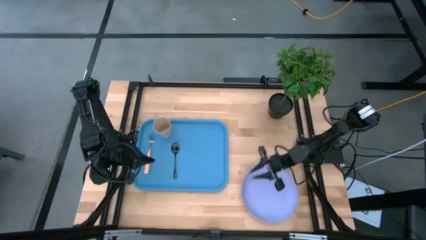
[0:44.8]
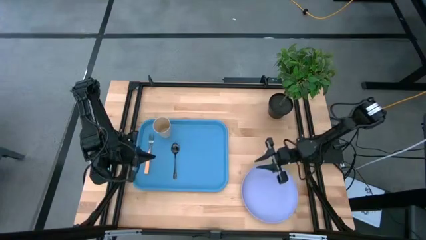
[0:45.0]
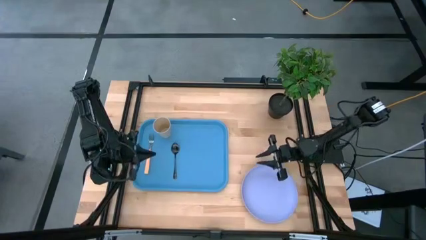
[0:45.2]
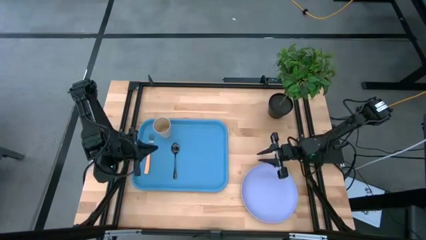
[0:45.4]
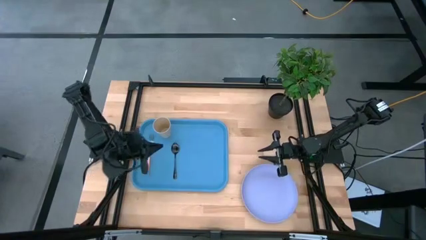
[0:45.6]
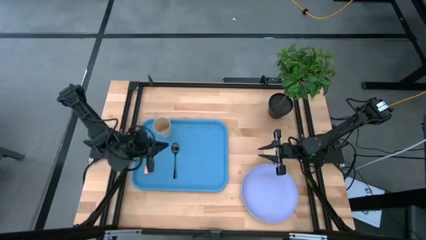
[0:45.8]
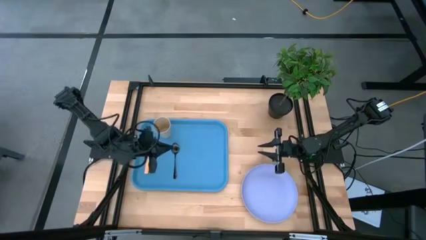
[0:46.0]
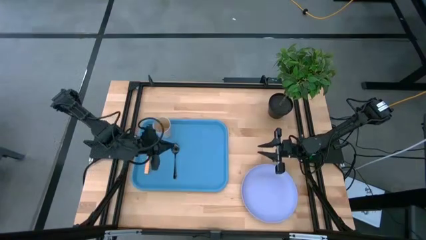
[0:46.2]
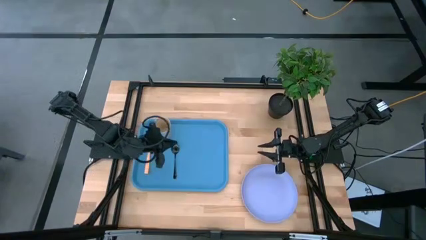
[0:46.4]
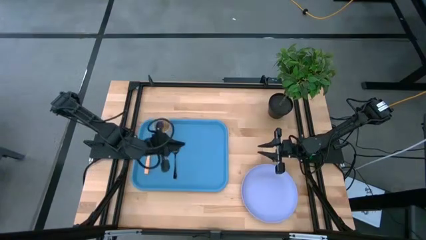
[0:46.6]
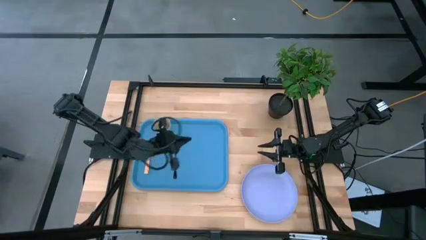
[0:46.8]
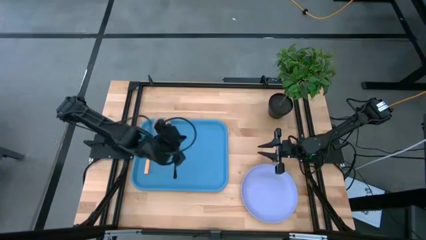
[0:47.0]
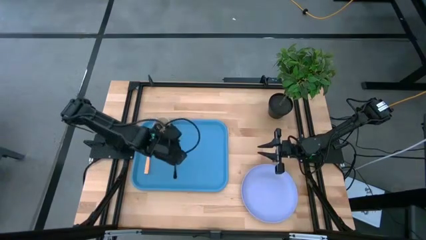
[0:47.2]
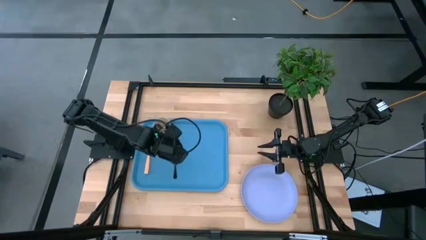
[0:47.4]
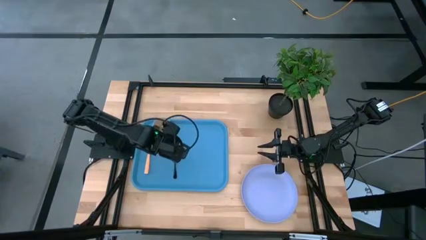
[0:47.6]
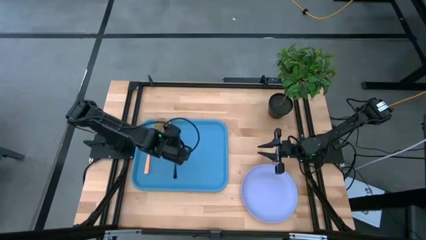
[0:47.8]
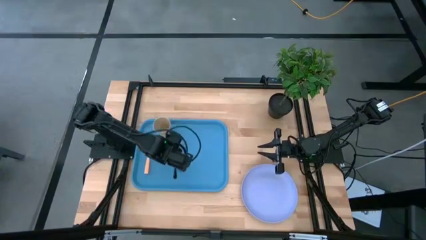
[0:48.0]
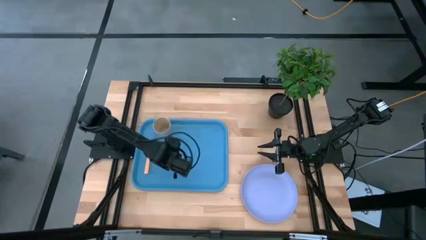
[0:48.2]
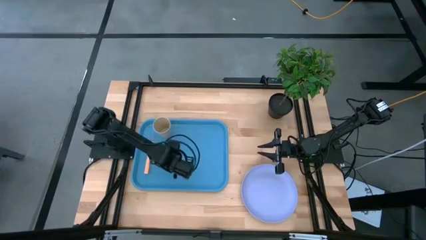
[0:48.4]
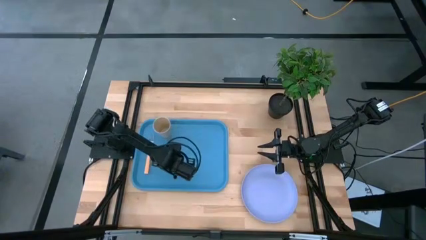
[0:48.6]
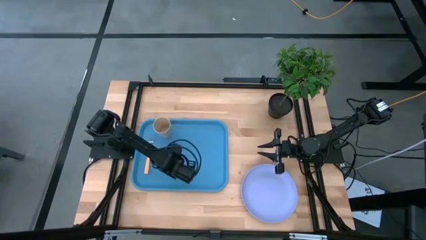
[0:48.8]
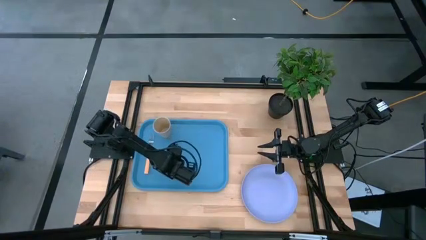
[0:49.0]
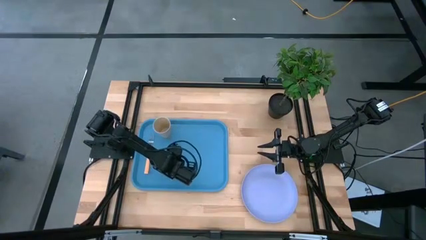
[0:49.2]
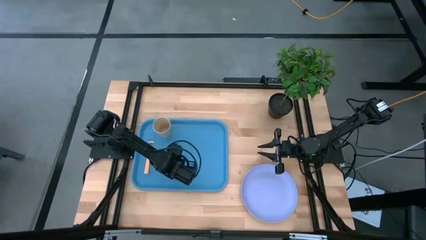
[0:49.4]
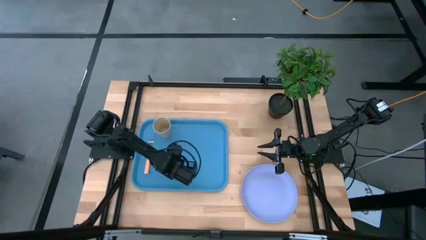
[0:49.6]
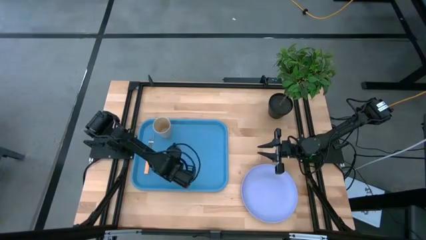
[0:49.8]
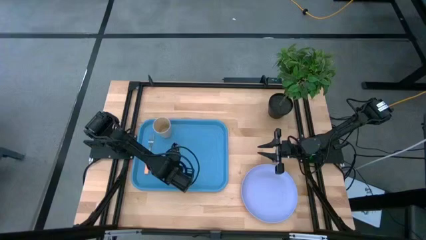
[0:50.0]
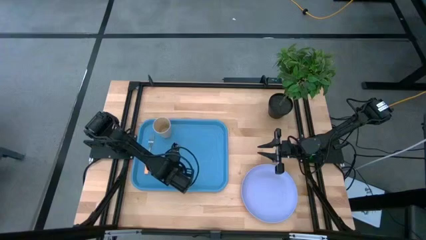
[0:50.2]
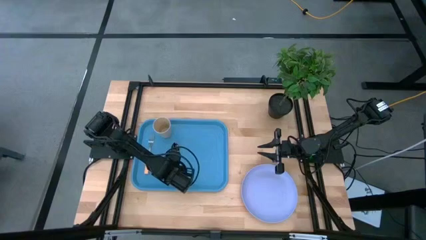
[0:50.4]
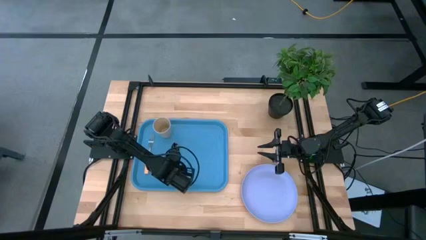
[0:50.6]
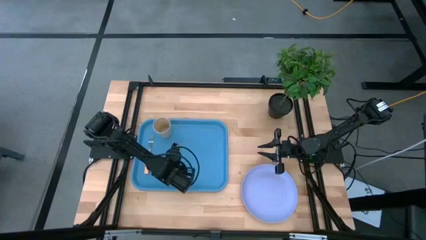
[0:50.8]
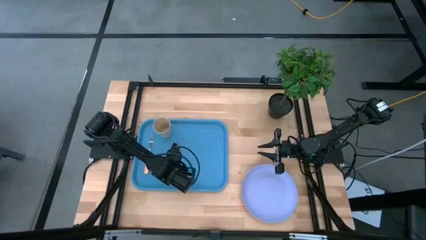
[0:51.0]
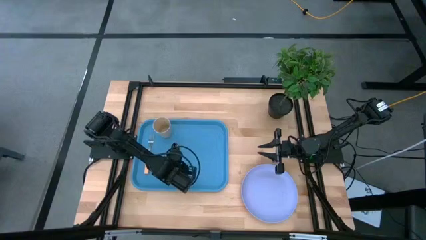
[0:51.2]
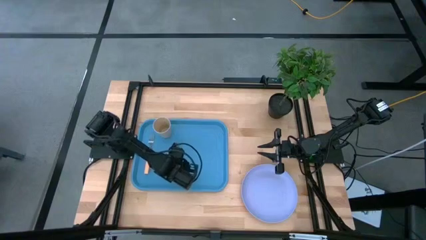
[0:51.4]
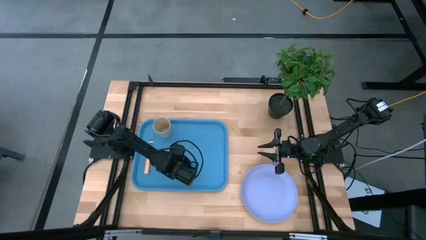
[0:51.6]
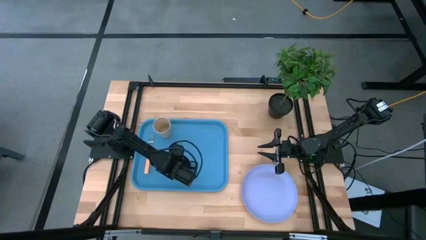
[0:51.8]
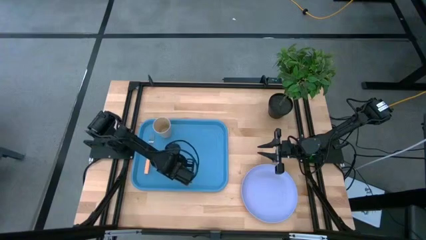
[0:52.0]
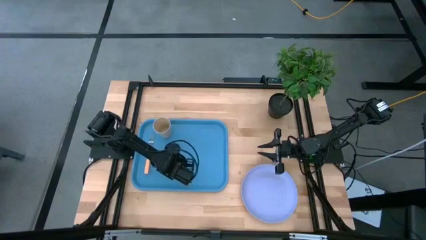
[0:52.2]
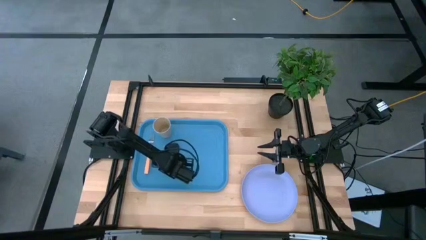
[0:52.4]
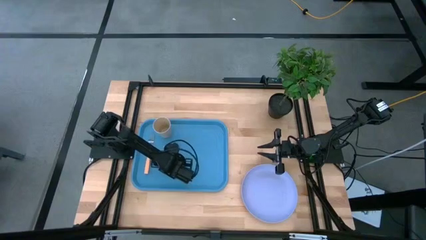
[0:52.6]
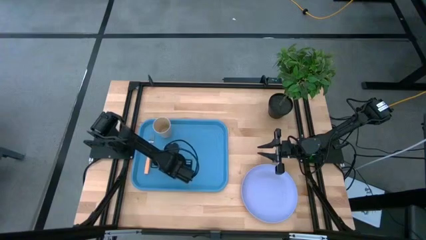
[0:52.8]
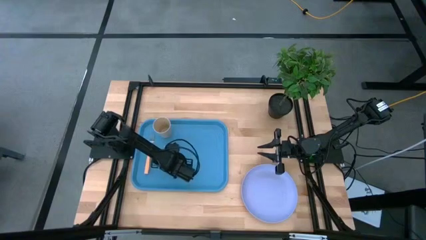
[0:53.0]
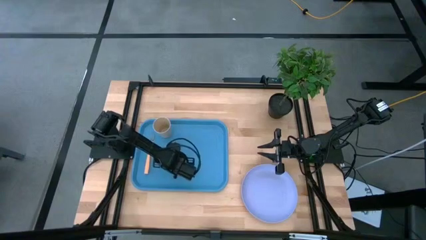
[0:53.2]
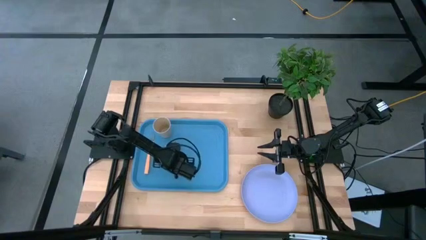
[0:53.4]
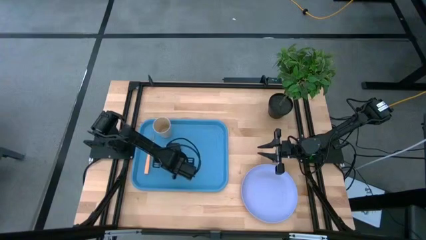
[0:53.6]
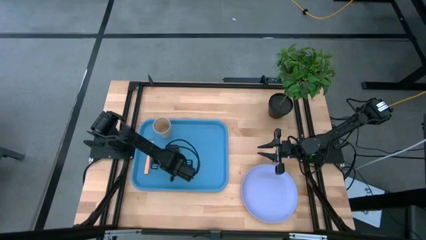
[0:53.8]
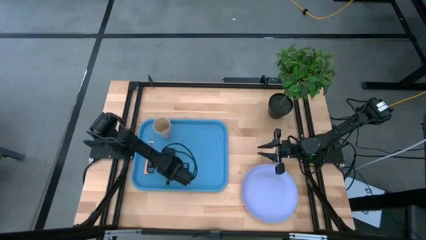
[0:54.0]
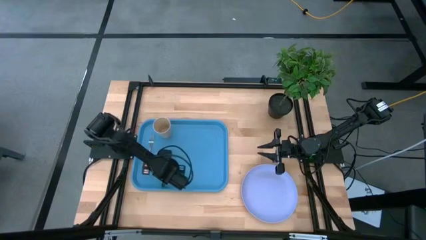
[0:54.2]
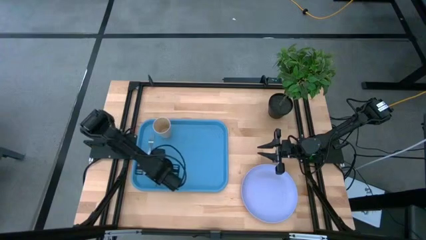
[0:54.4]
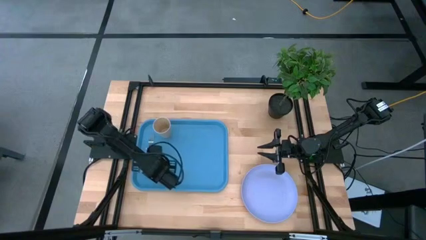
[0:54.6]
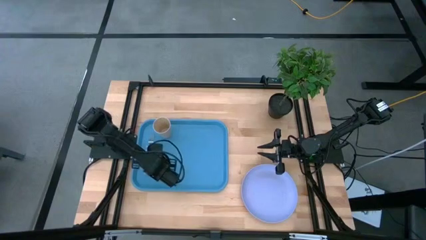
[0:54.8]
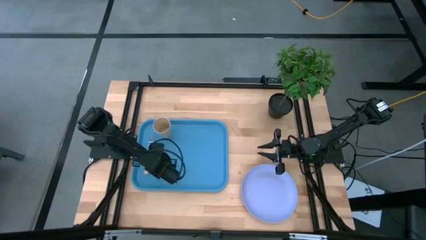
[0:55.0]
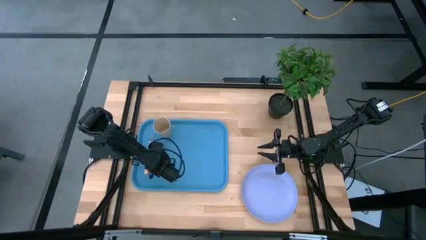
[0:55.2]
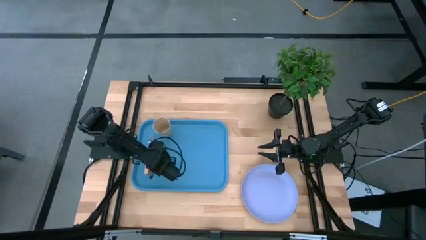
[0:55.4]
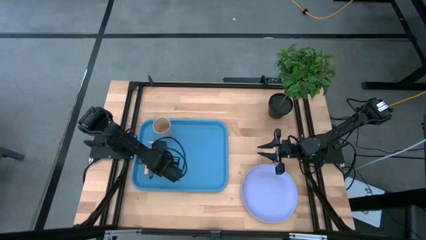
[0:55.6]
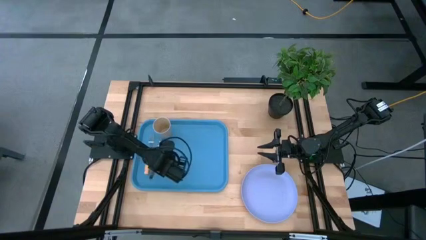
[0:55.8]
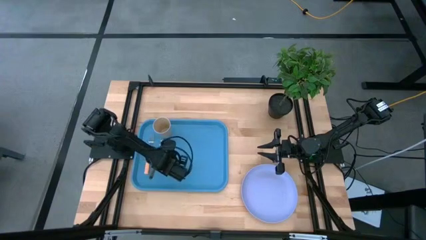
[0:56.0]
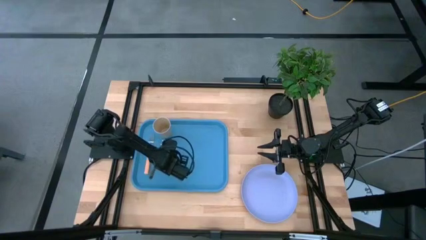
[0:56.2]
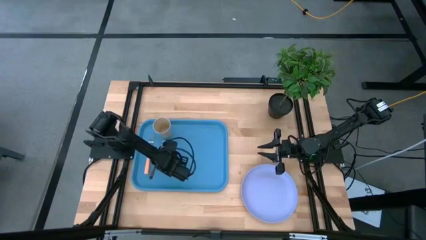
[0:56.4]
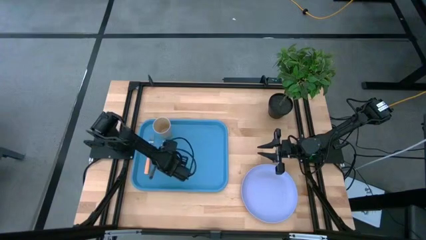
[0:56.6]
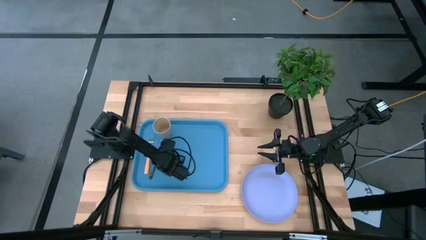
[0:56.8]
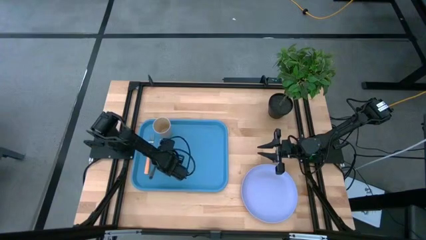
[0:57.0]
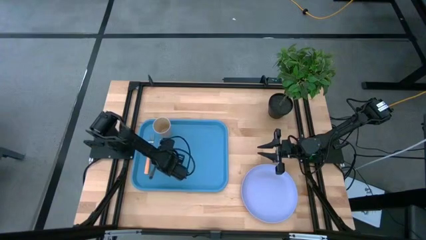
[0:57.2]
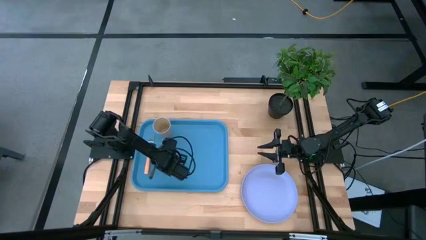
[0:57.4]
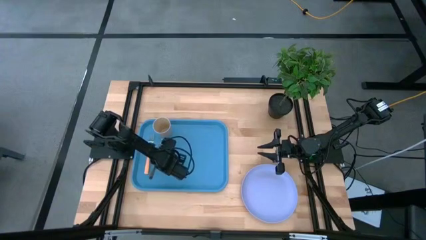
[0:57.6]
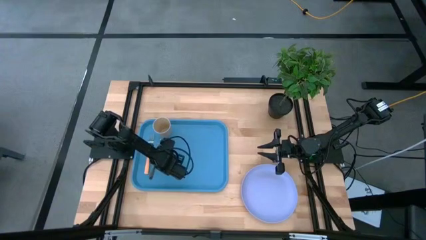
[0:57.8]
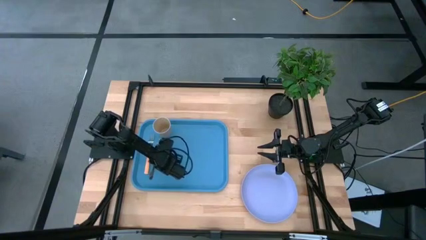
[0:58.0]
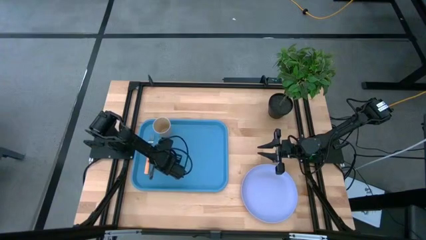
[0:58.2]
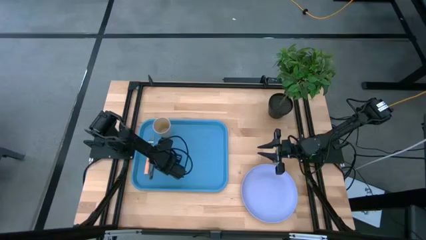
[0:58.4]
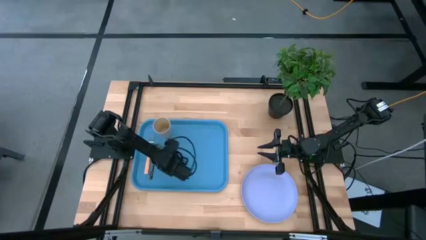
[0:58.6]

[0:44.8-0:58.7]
Task: Pick and place plate/cup/fork/spoon on tray
Put the black spoon on the blue tray

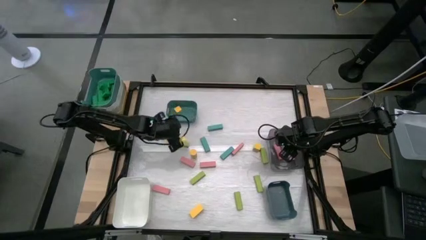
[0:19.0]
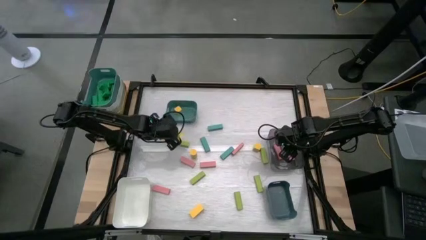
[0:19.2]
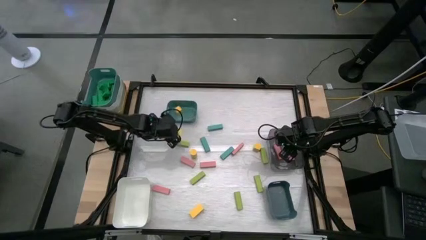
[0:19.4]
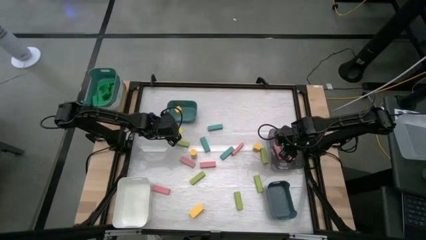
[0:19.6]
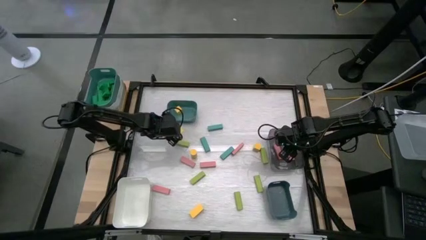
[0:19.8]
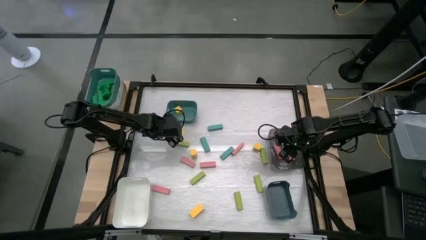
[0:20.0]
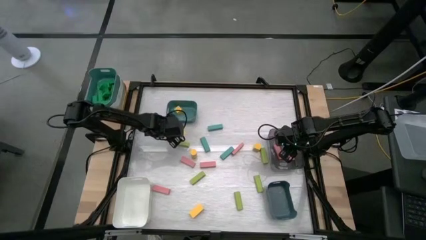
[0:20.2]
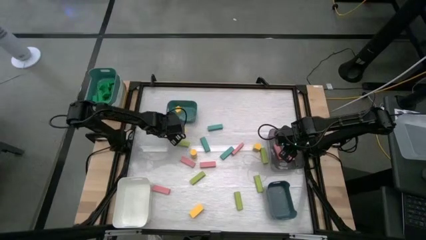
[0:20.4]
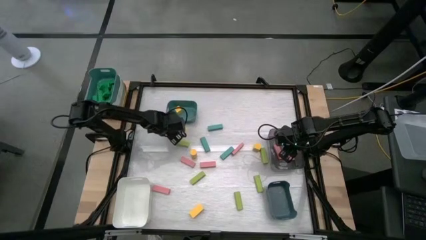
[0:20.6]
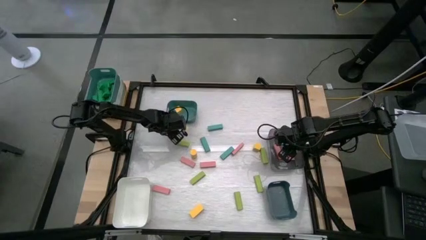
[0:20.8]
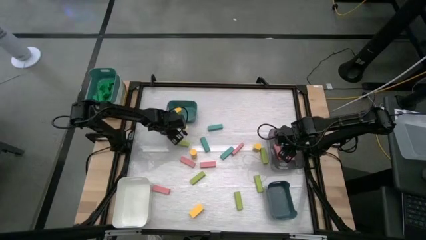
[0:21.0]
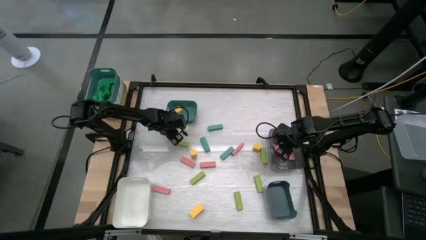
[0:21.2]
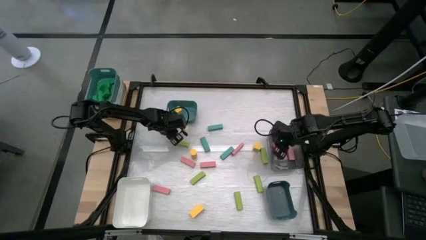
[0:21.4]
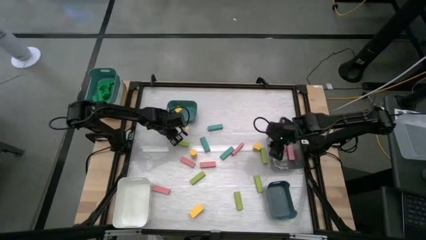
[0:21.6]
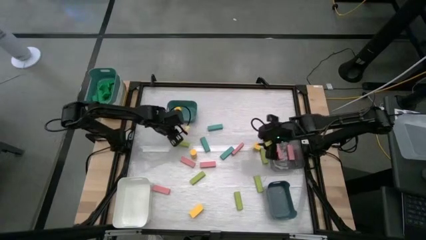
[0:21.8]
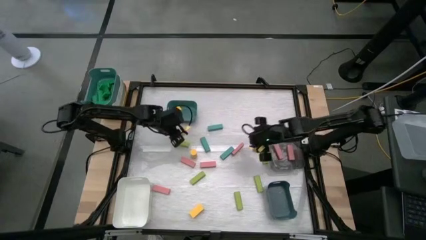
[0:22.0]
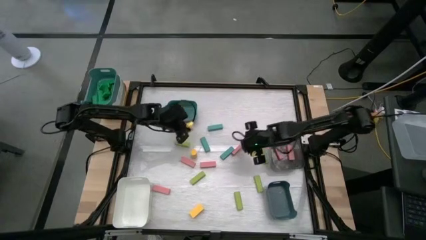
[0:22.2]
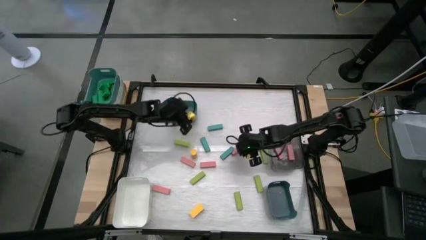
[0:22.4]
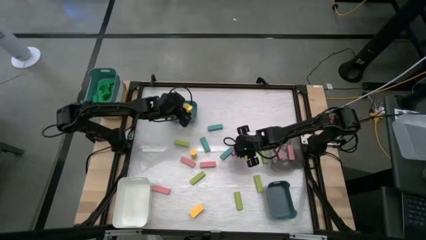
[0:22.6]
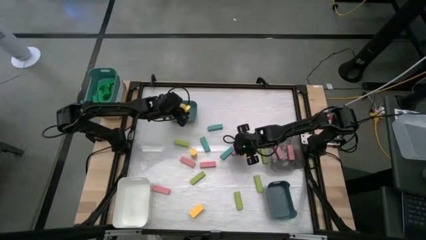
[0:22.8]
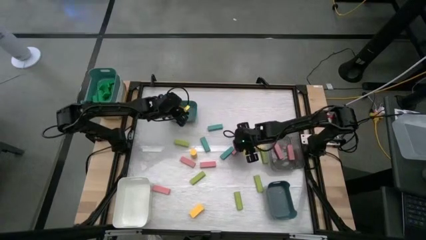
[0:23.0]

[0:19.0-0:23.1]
Task: Sort blocks
Put the yellow block into the green bin
